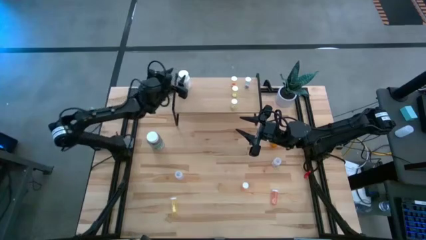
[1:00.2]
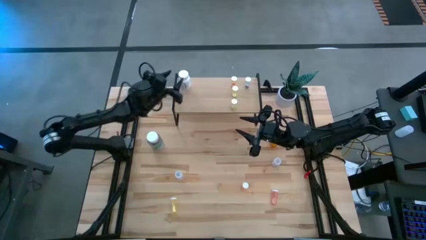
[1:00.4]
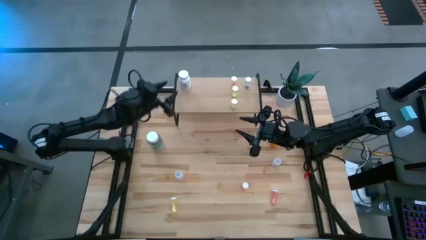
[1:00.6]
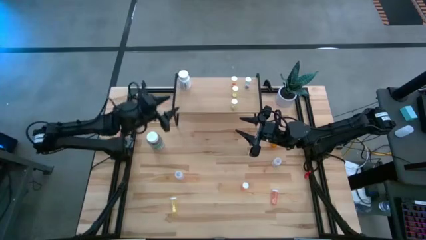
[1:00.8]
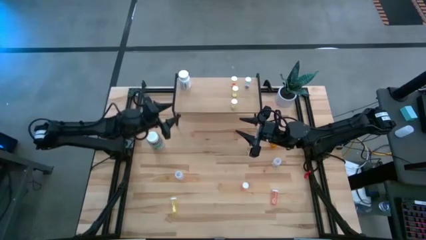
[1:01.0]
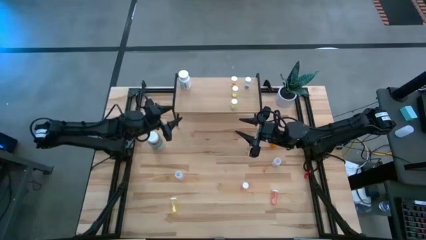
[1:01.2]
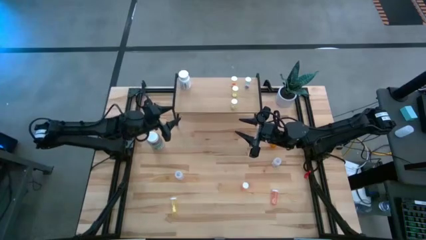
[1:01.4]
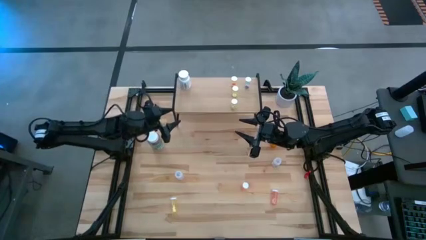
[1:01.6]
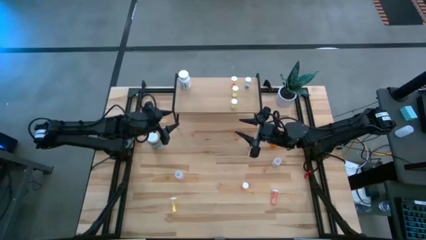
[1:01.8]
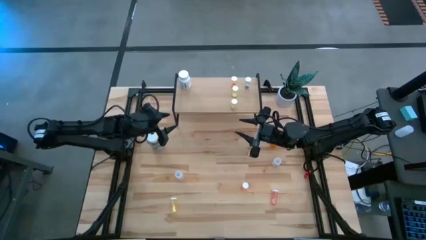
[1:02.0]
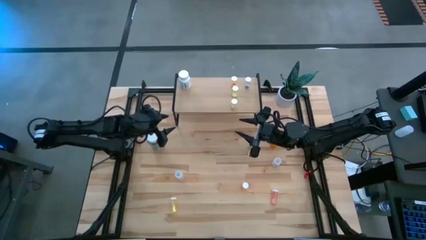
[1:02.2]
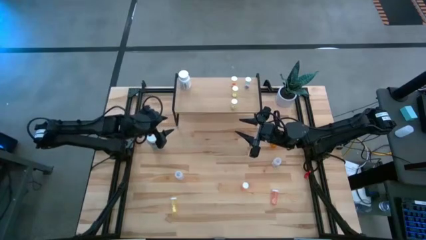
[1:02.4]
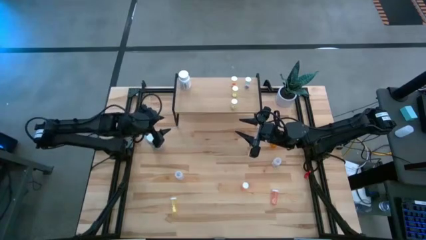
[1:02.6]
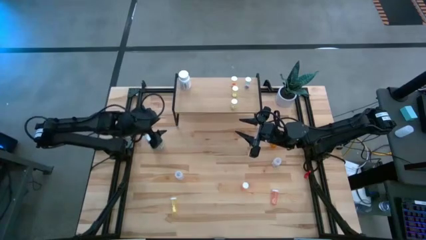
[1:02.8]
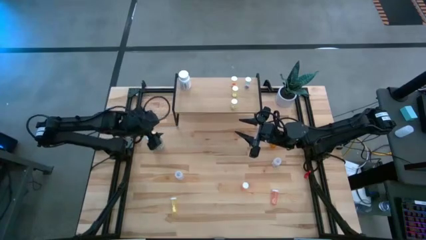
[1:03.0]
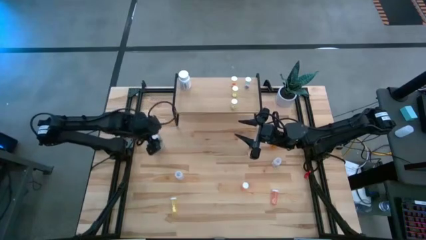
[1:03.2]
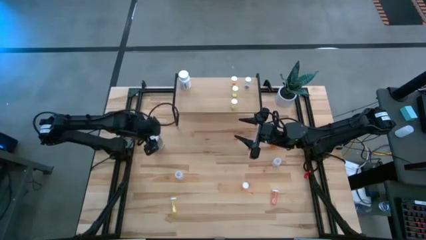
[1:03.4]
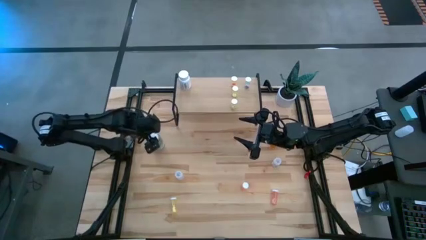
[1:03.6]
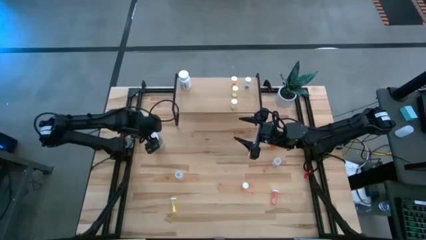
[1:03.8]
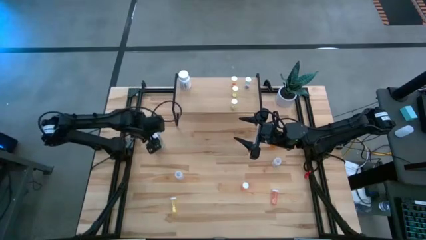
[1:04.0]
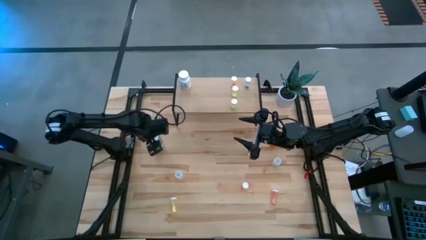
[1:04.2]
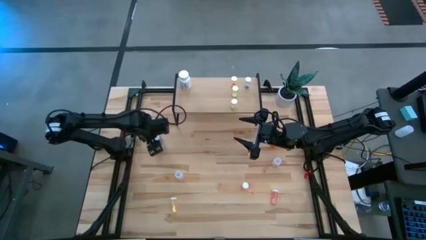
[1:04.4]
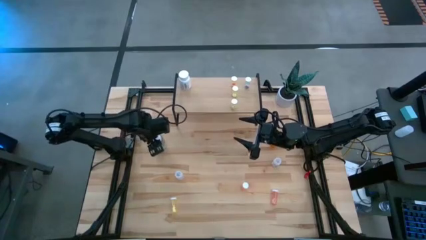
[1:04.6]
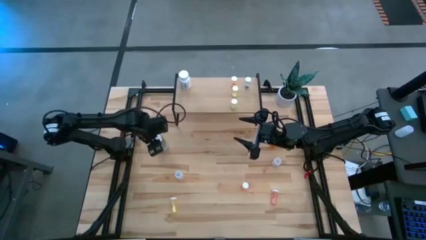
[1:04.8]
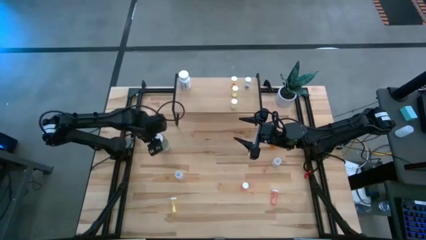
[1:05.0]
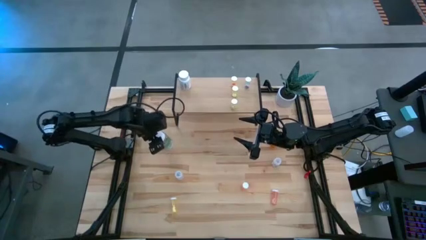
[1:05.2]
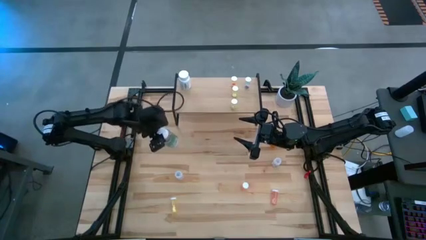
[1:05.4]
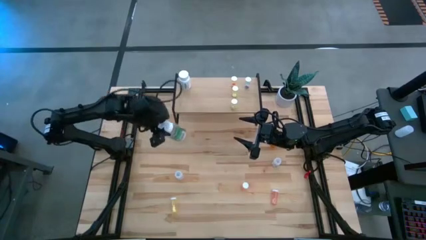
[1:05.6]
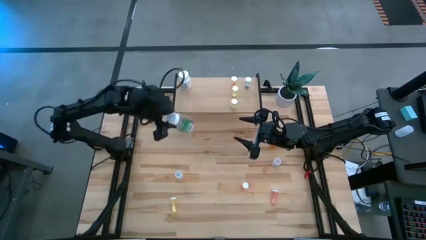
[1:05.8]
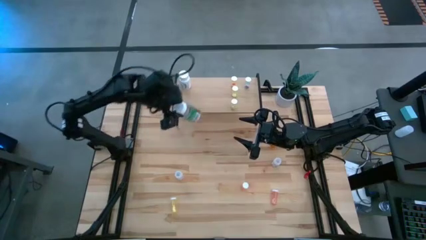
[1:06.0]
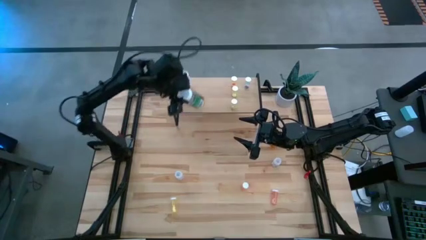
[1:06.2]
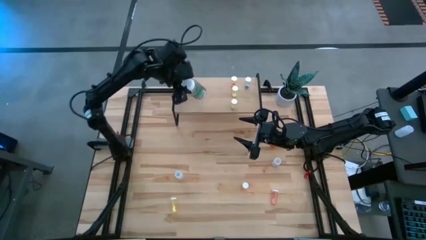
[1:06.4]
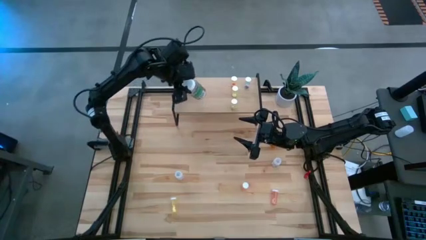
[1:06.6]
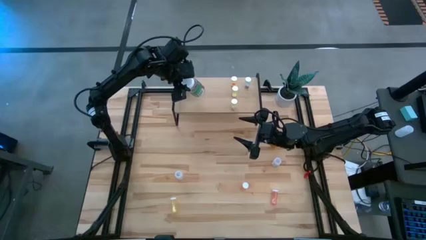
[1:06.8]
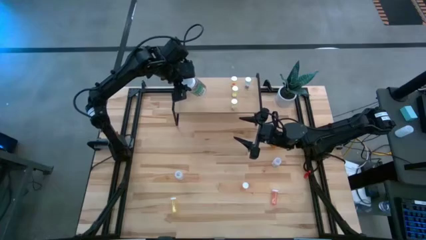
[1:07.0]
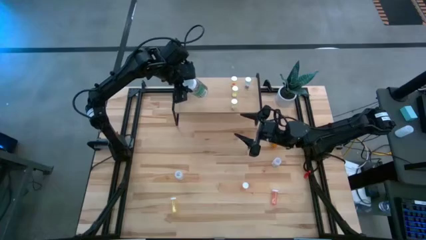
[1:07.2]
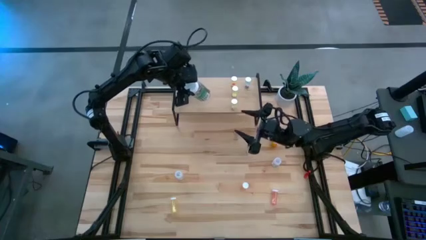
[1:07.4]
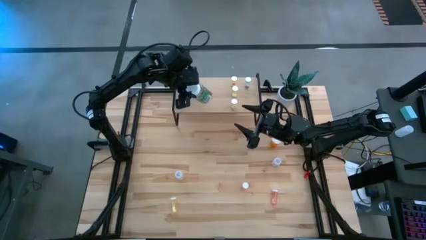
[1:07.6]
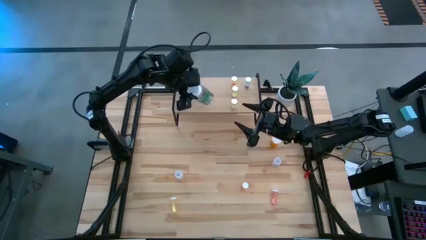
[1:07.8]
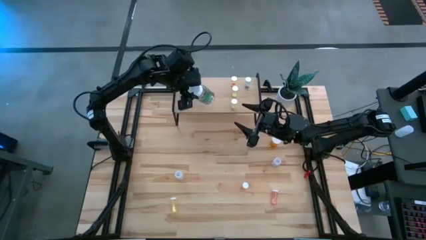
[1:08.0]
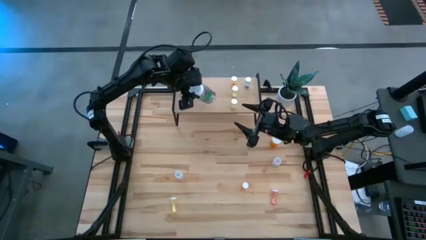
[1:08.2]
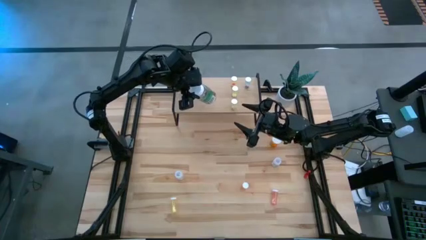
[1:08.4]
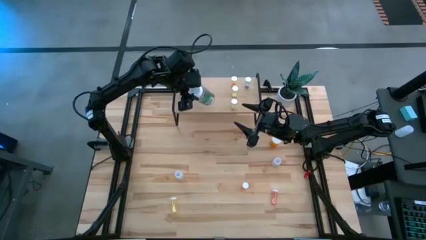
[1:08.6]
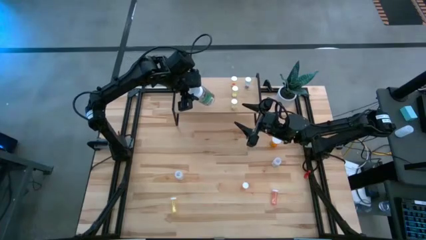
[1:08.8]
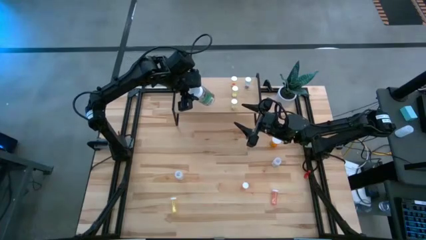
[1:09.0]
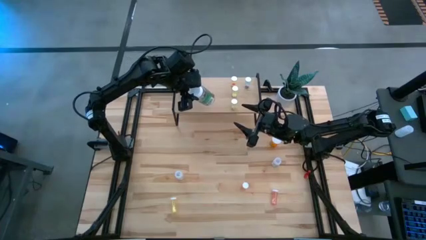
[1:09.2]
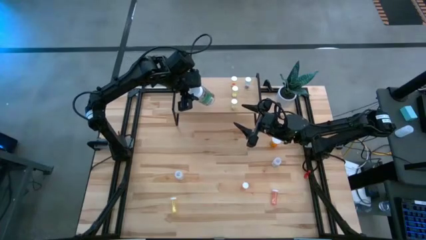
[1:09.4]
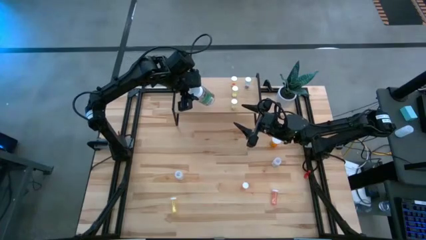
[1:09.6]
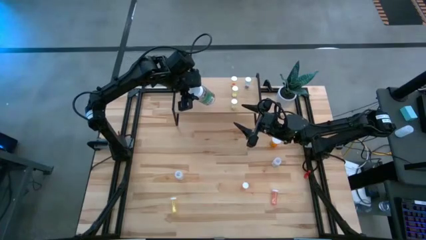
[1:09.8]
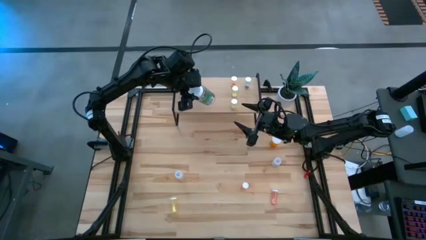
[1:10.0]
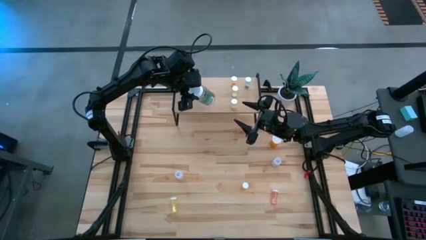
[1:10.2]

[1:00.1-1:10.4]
Task: Pick and place medicine bottles onto shelf by color
Put the white green pill bottle on the shelf
